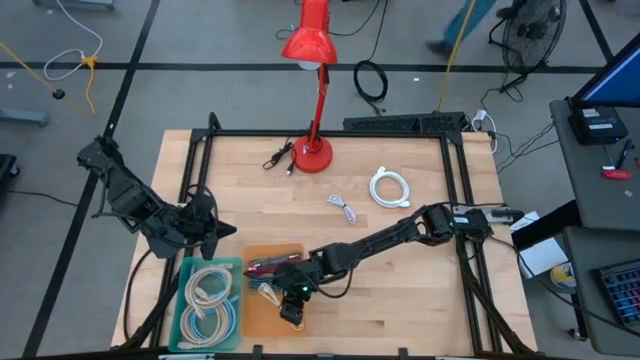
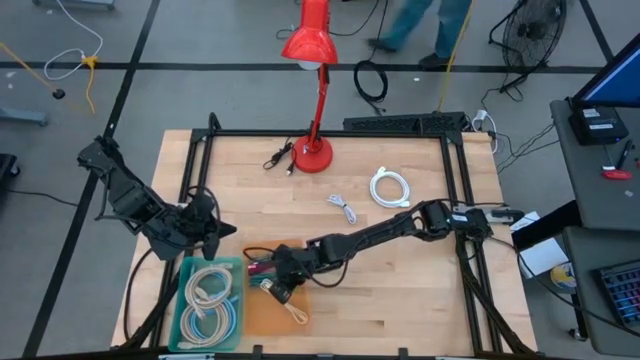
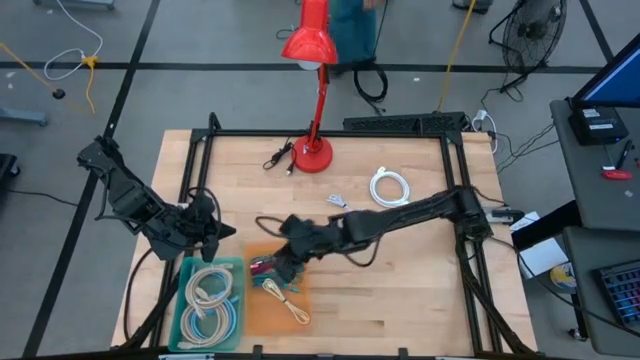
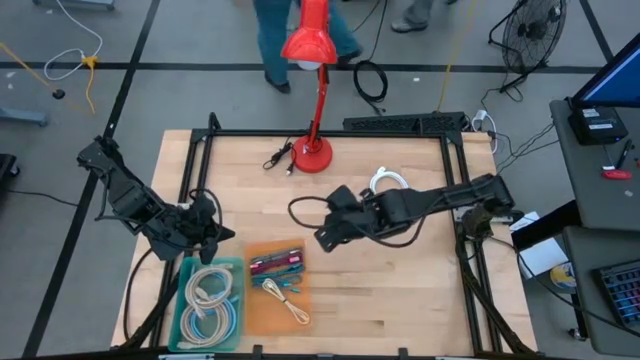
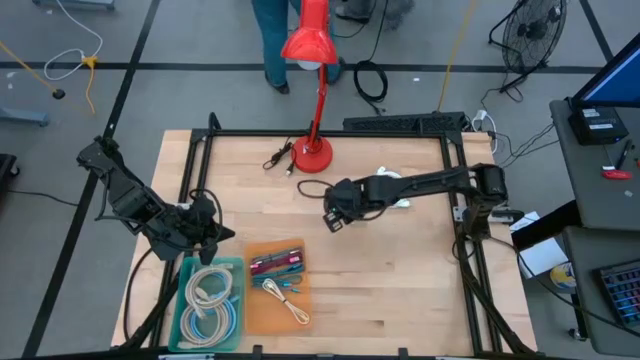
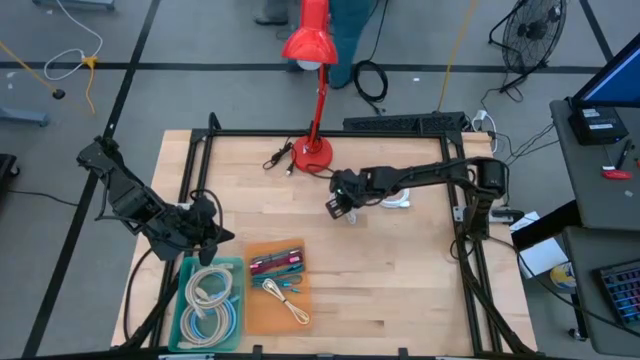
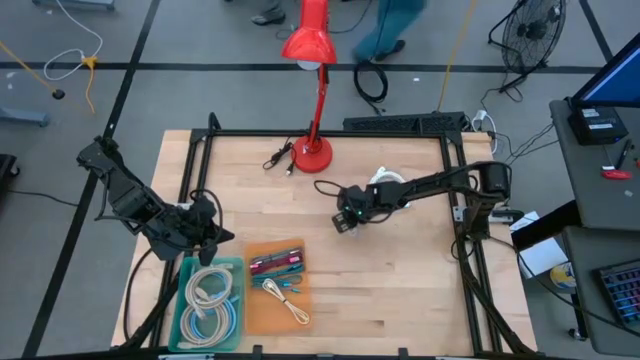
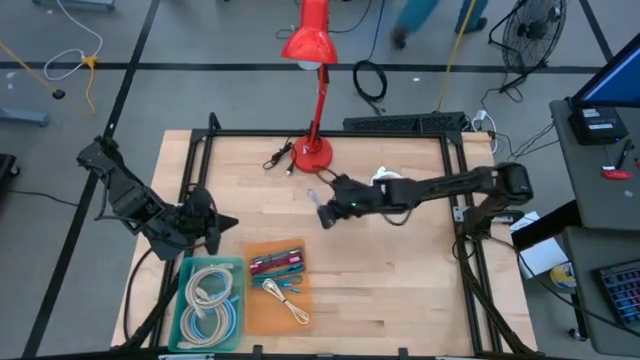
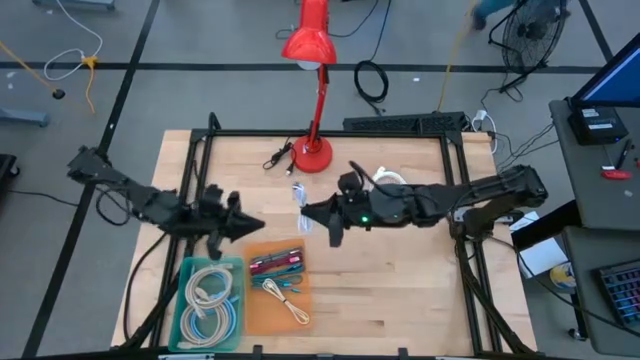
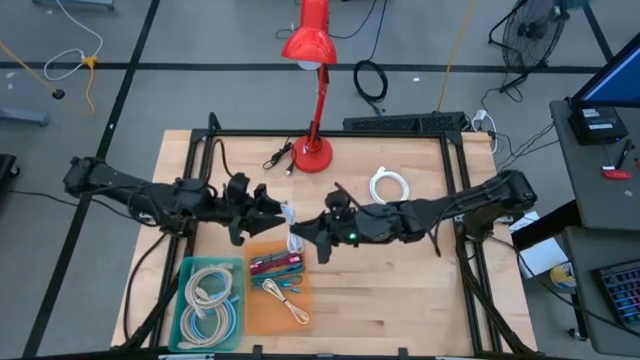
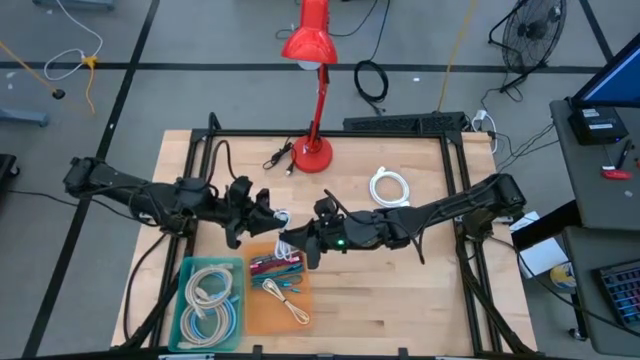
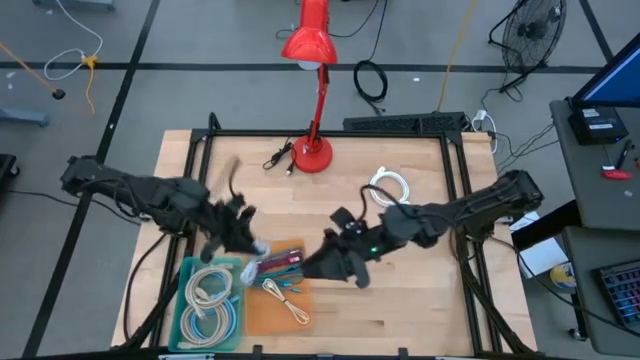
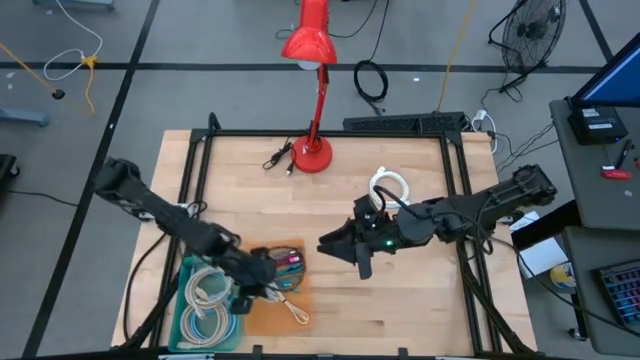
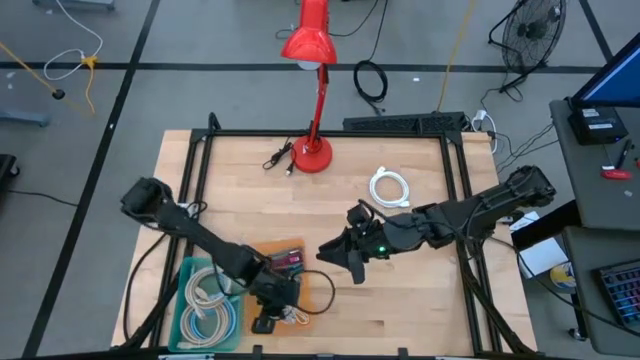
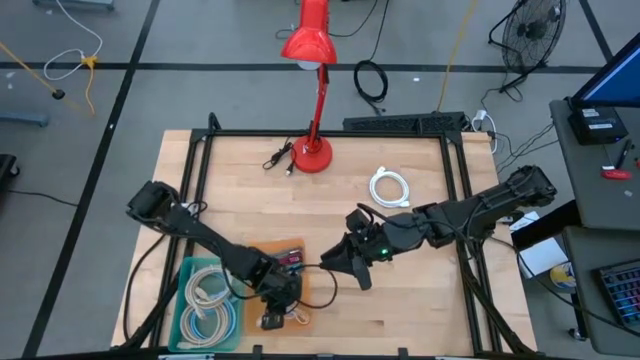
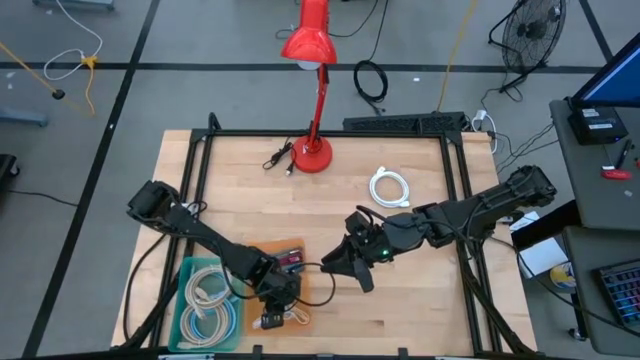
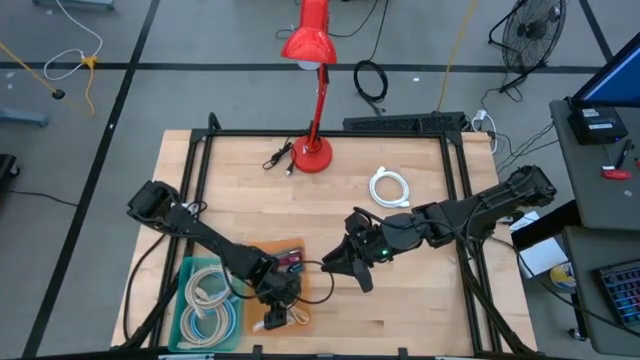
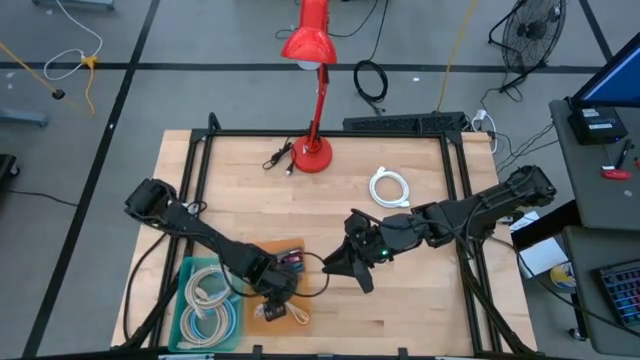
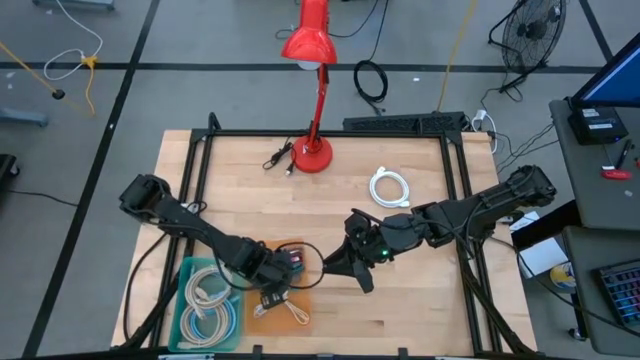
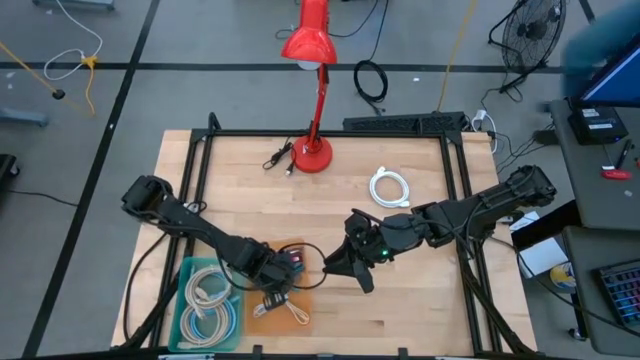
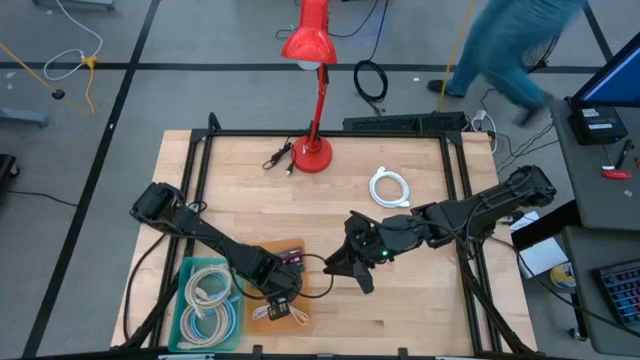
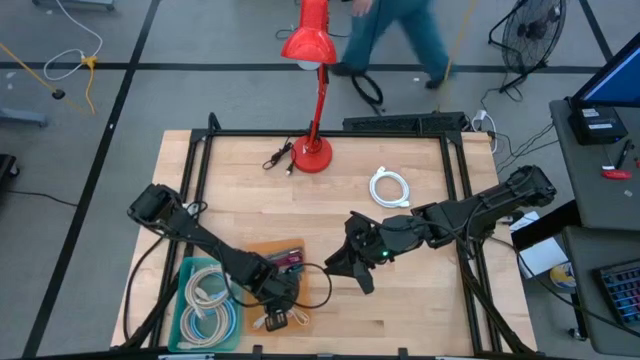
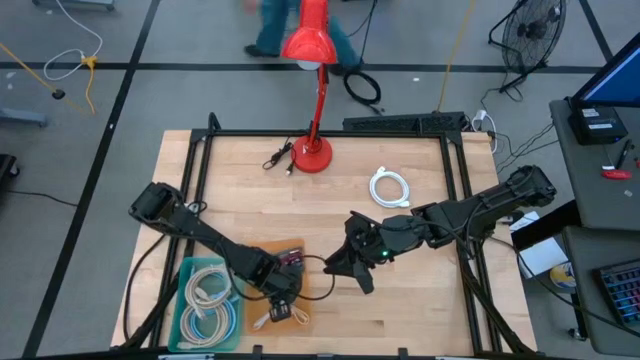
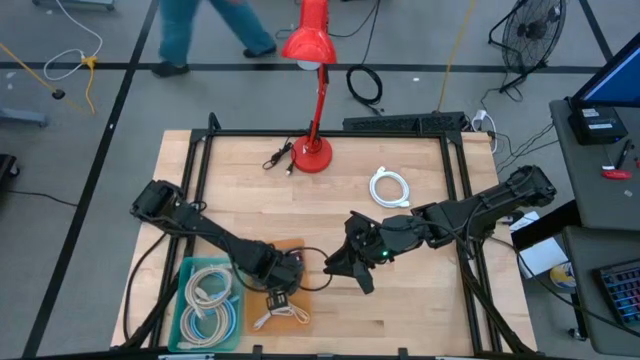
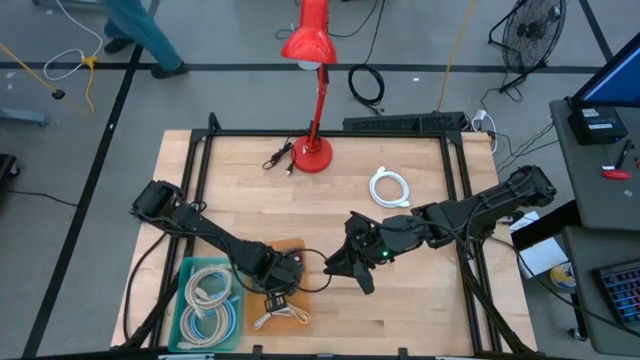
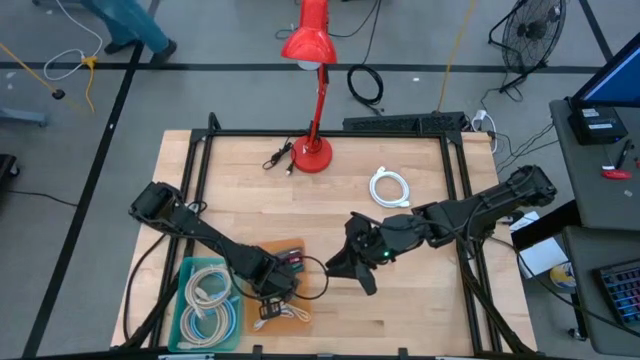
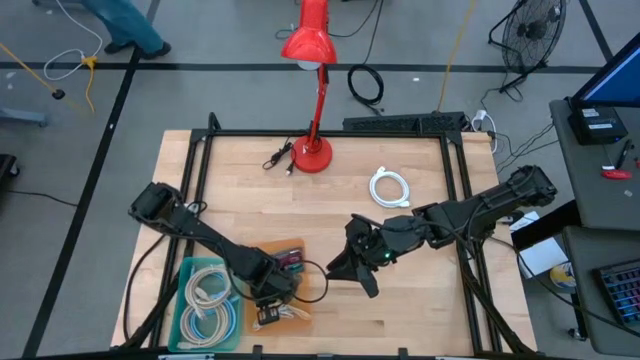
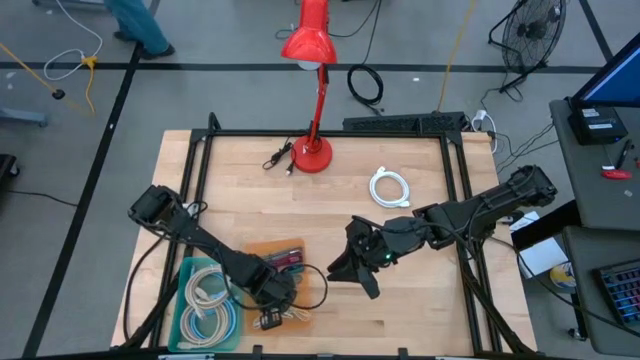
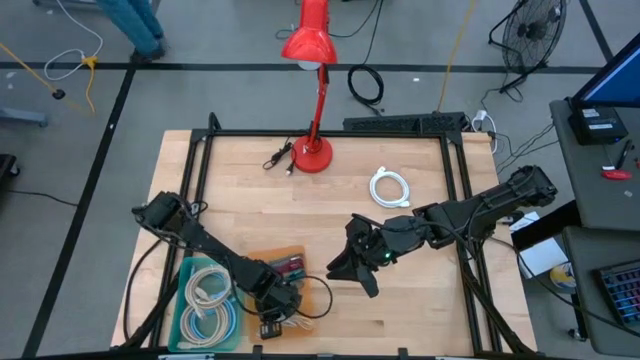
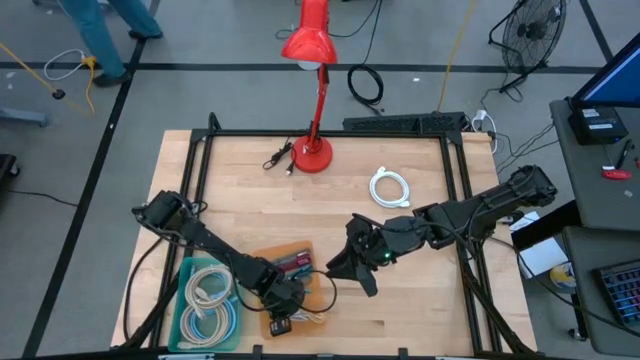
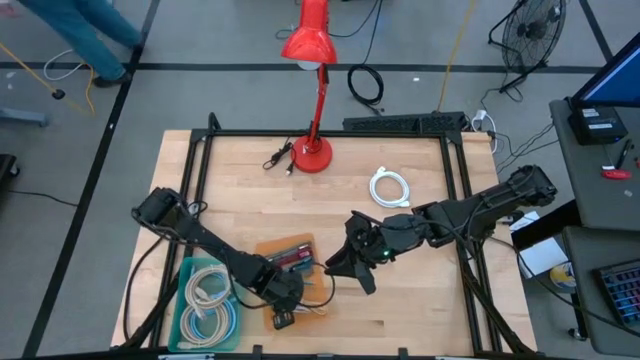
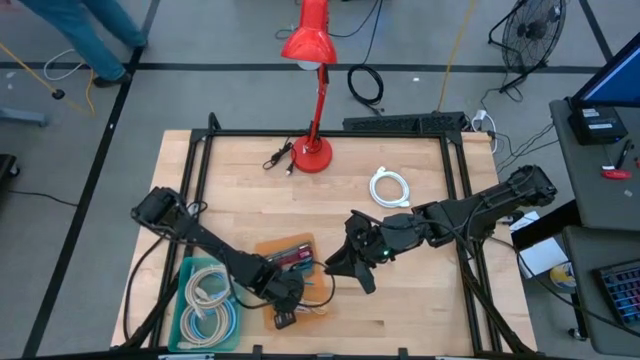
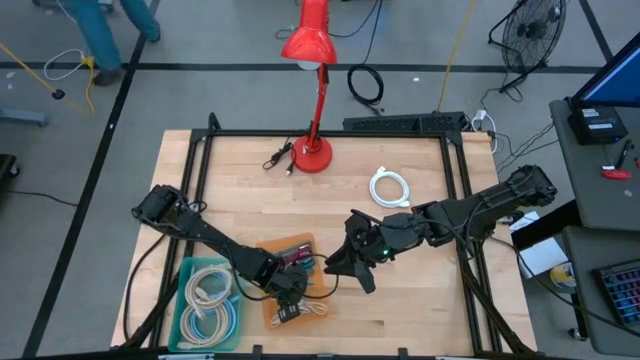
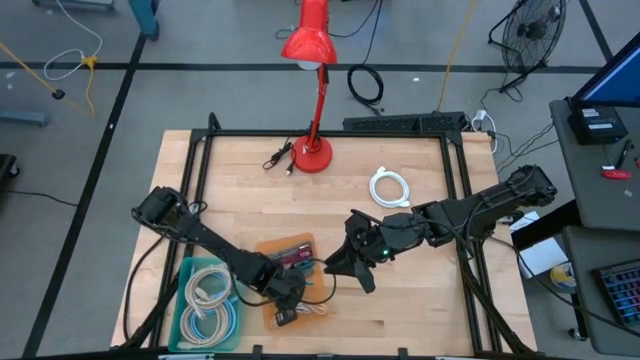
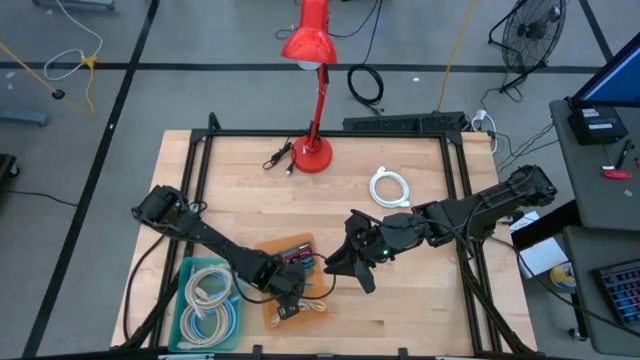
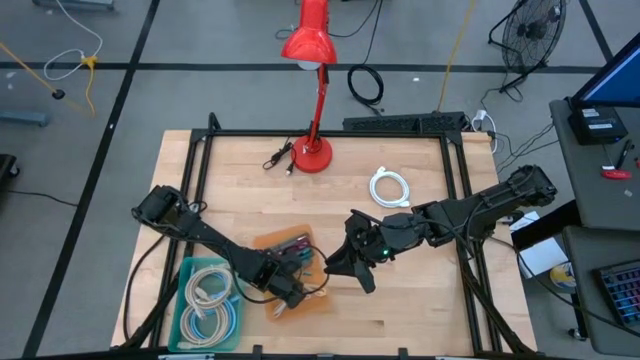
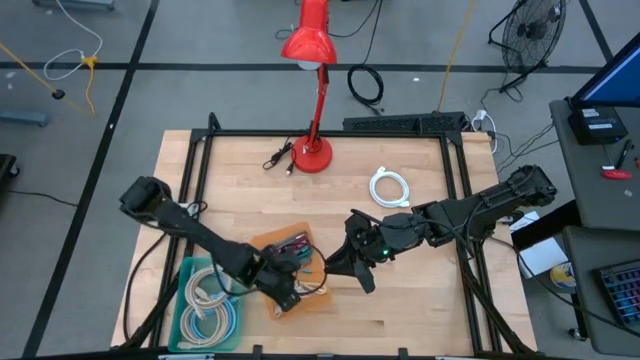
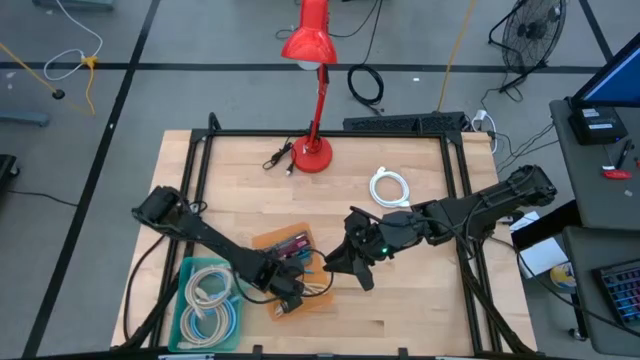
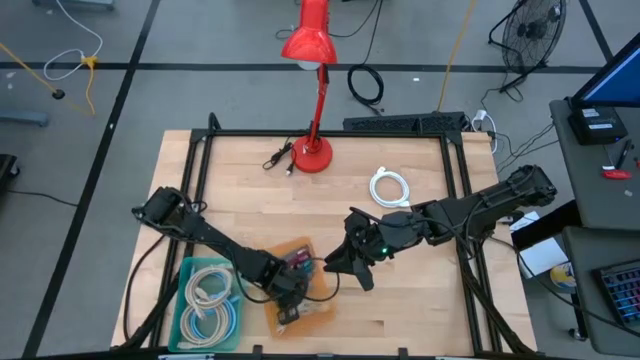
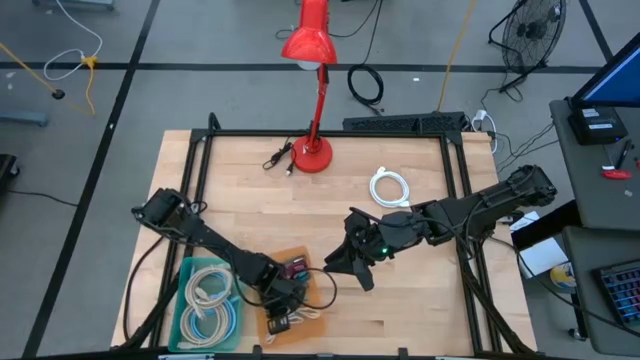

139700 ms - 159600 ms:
Task: Pick & Place USB Port
Put the left white USB cable into the orange bin
